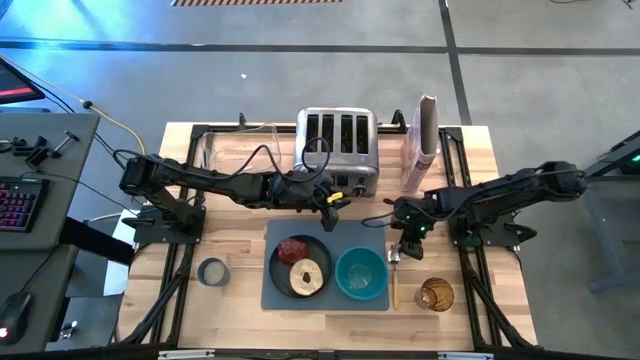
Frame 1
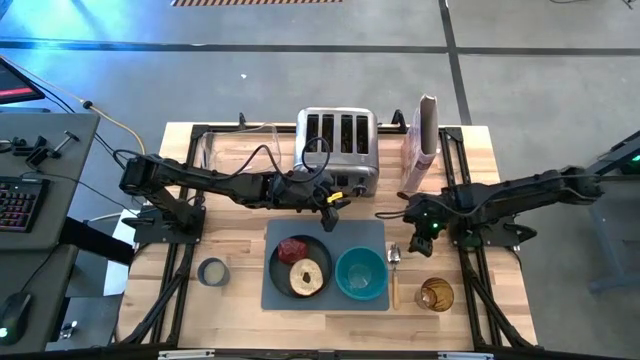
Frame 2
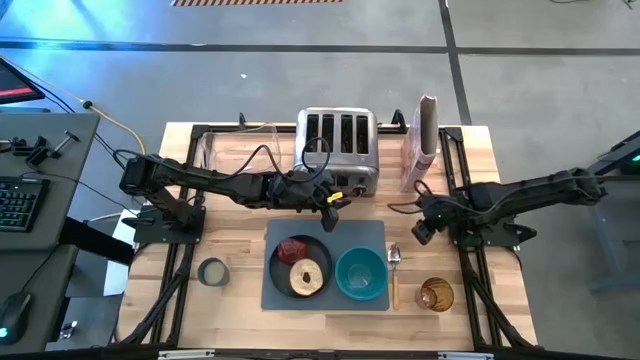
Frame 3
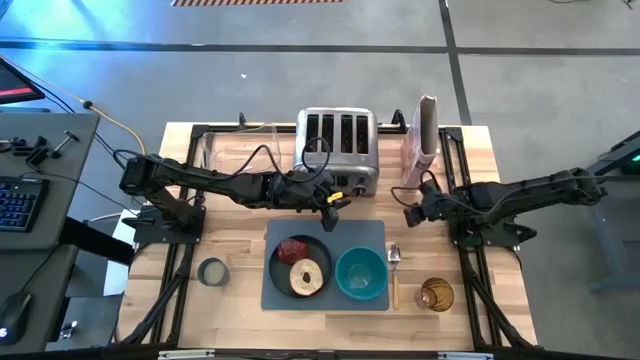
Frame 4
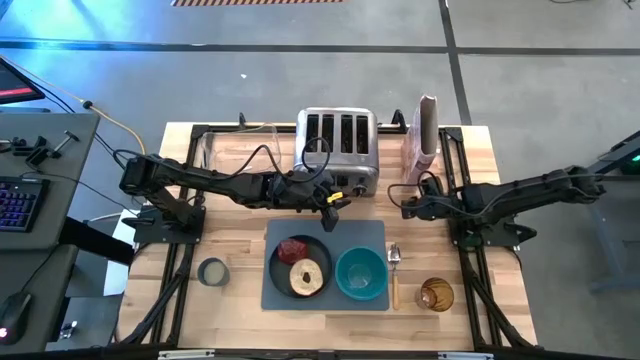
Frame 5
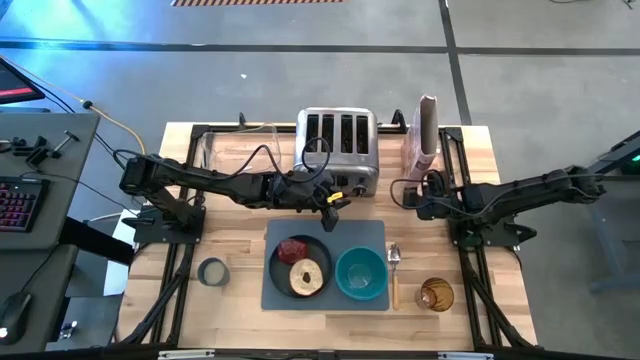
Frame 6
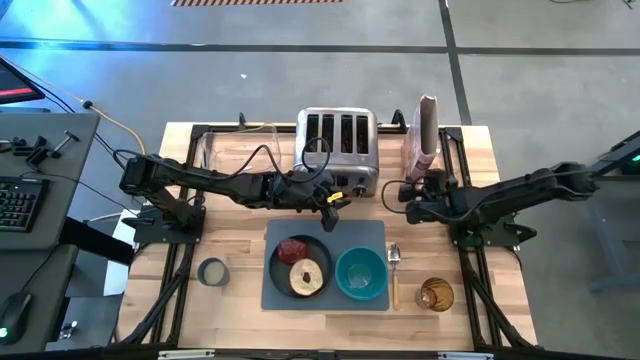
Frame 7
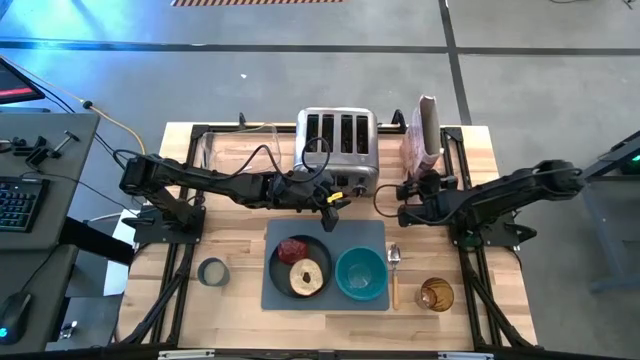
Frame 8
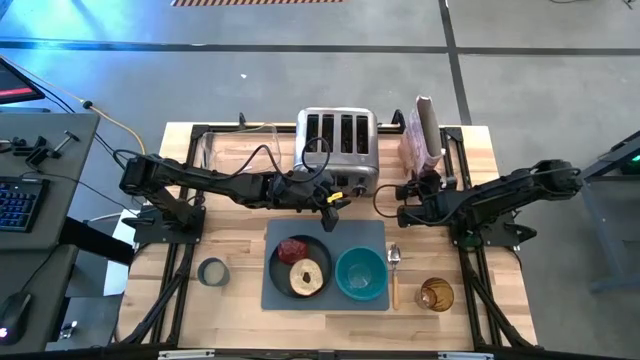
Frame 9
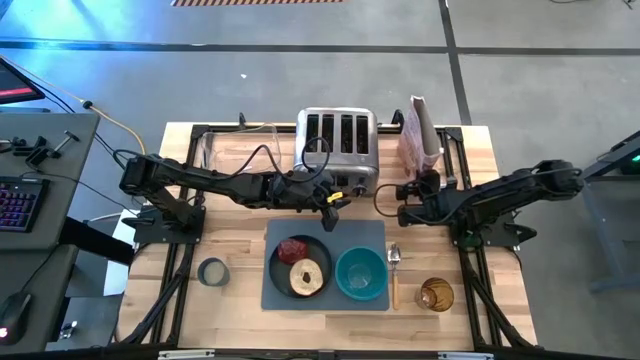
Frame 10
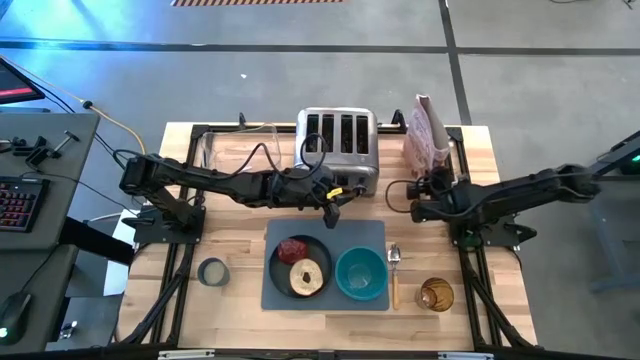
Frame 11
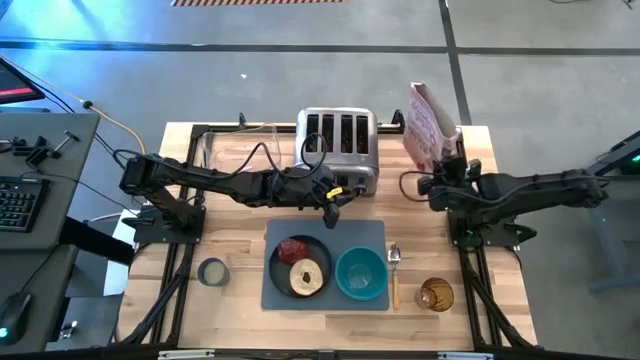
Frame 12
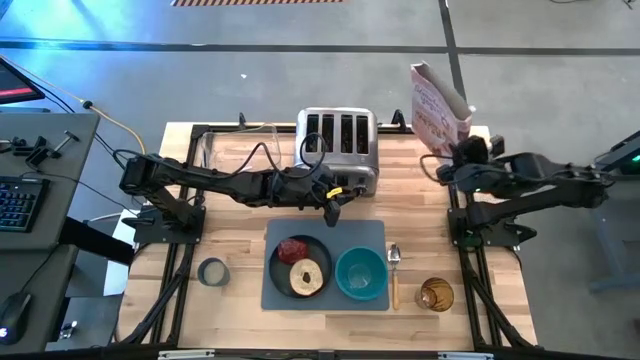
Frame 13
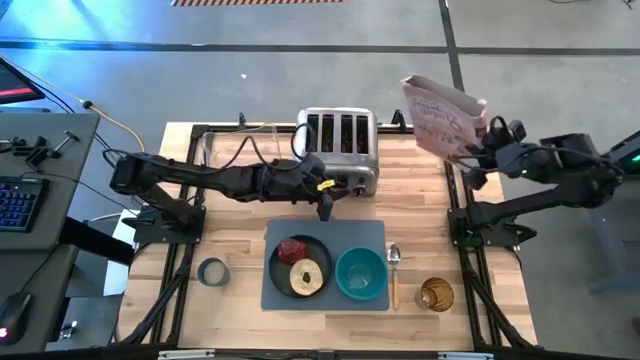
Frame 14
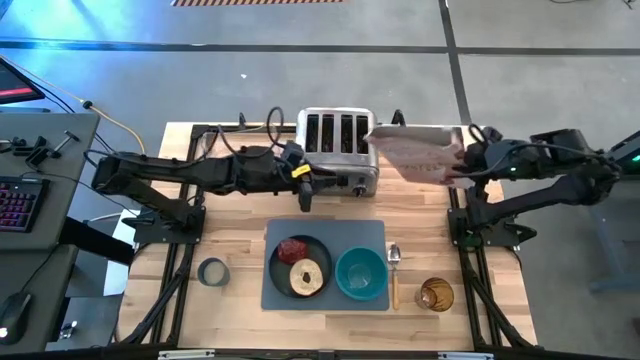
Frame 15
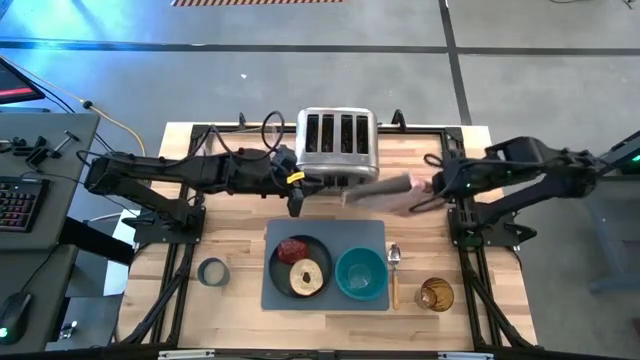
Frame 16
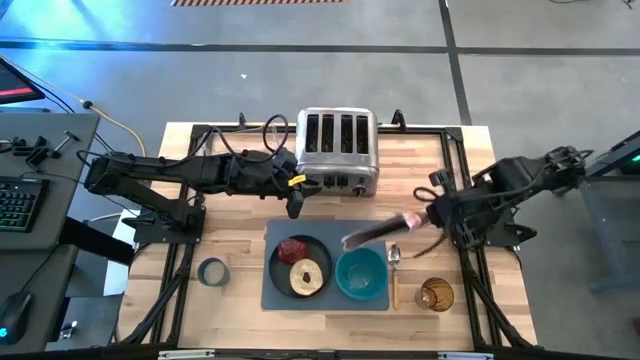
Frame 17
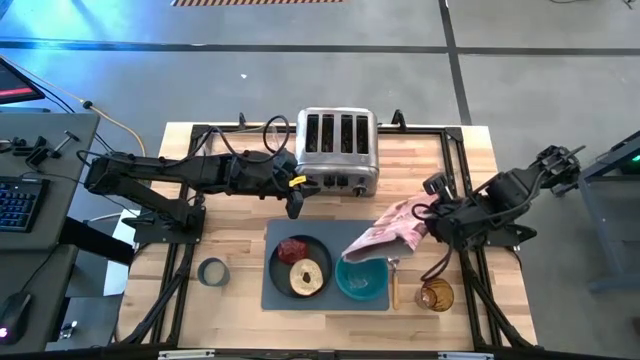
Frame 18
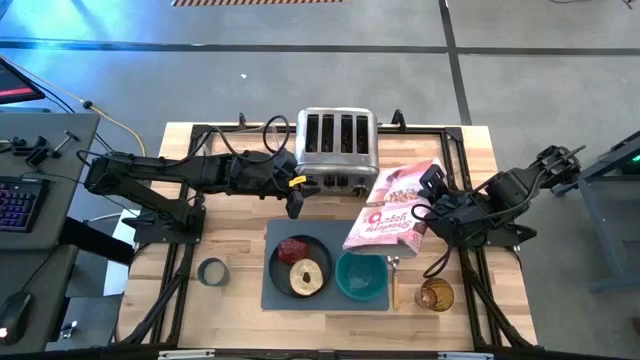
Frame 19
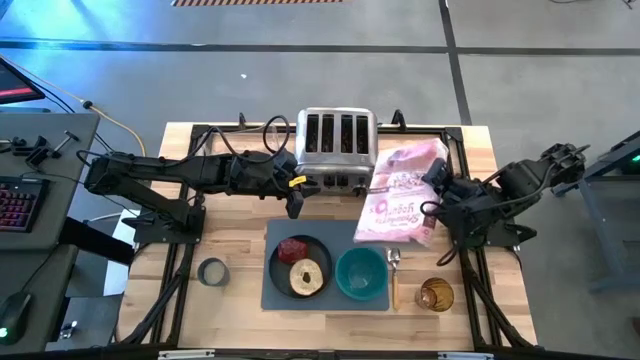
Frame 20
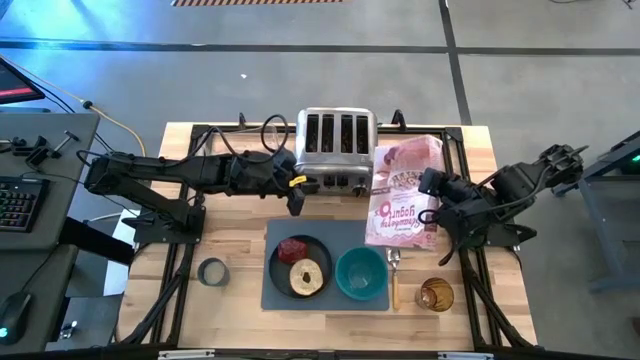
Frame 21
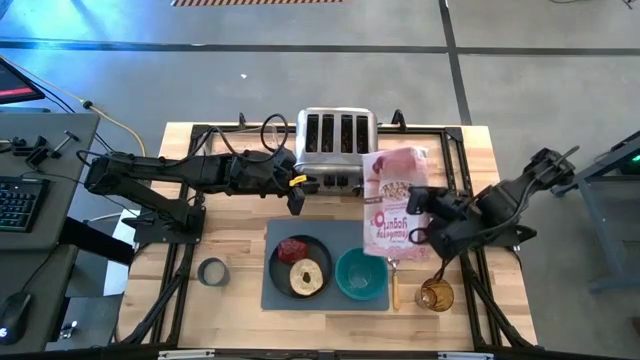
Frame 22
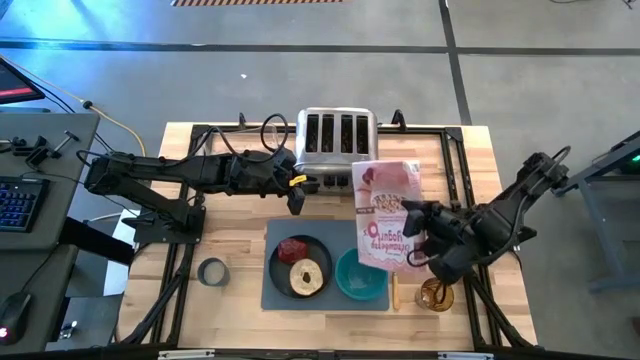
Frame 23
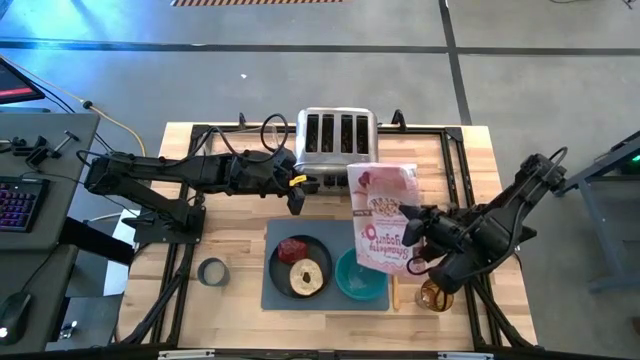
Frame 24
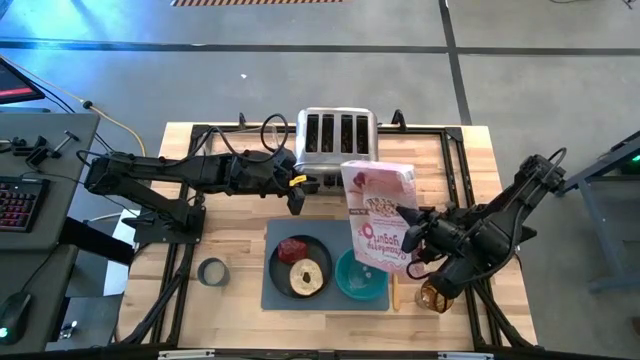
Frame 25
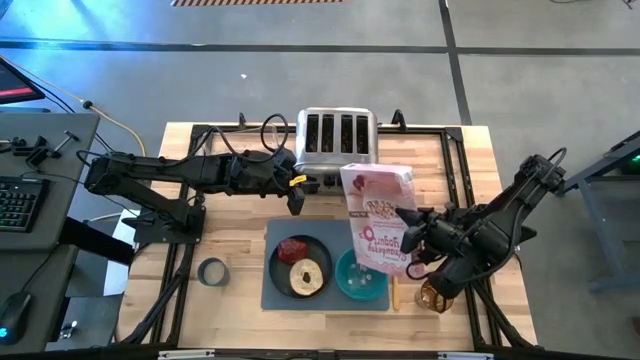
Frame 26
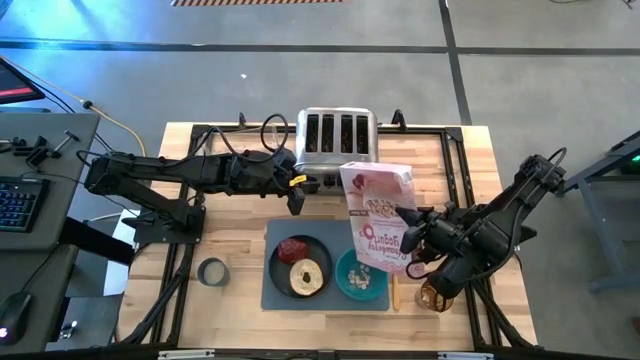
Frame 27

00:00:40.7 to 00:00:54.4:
Task: Arrange a breakfast setting
Pour the cereal from the pink cereal box into the blue bowl

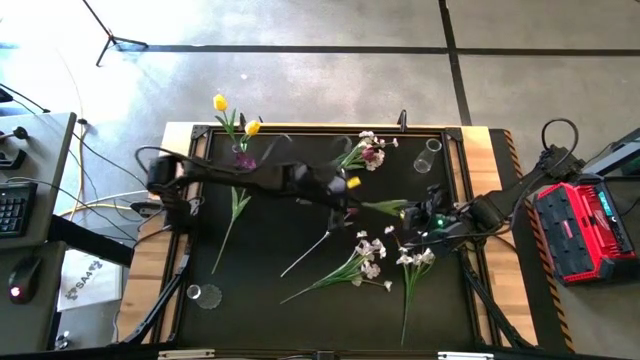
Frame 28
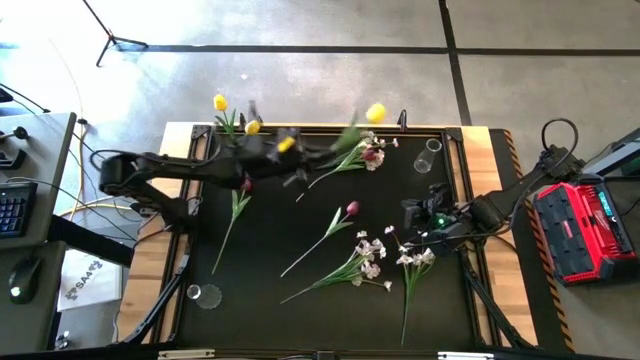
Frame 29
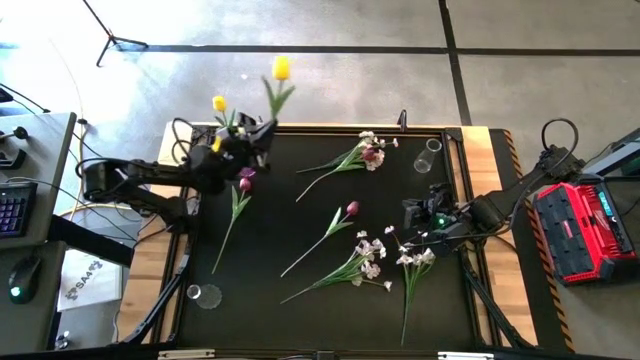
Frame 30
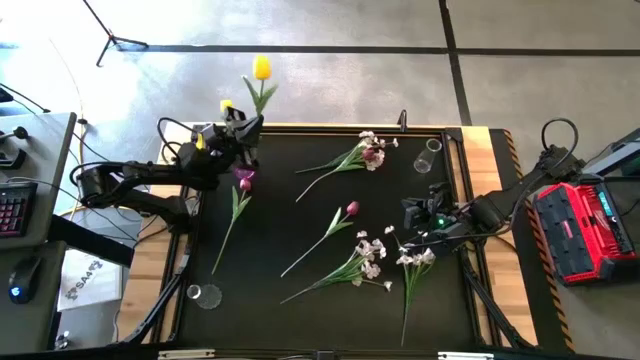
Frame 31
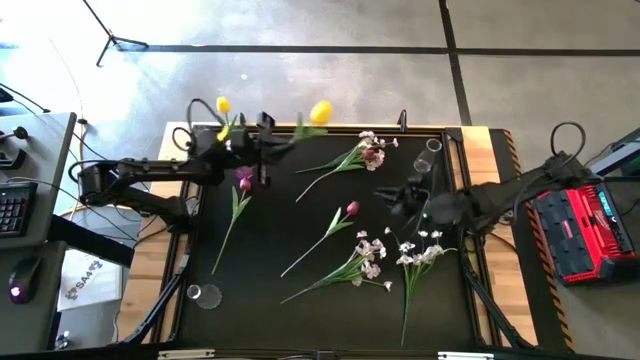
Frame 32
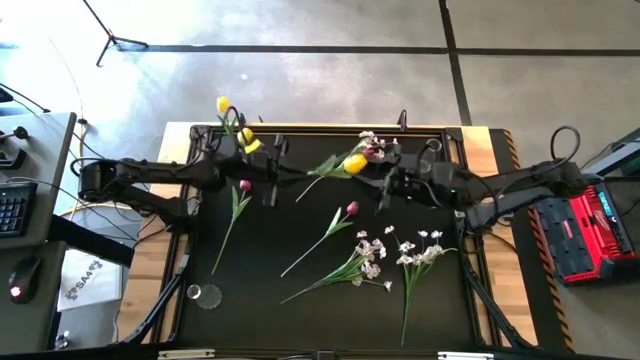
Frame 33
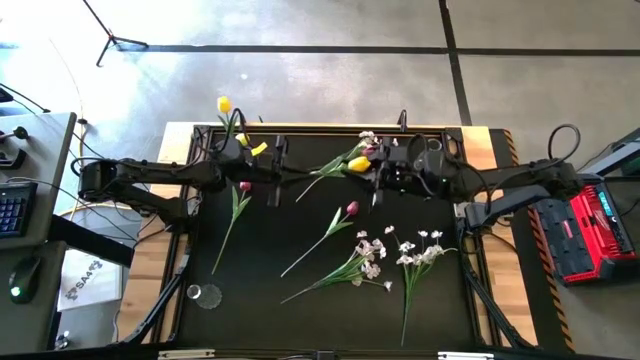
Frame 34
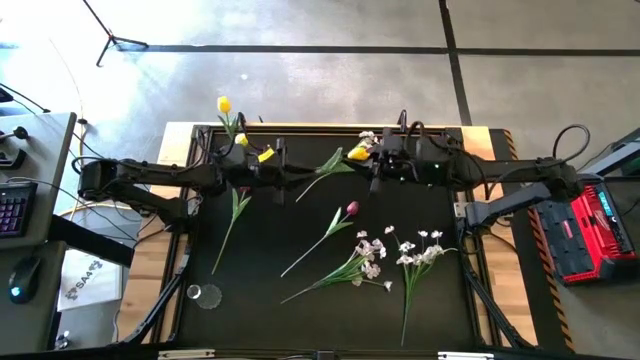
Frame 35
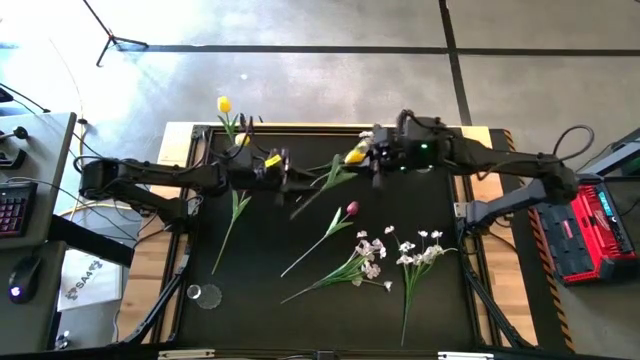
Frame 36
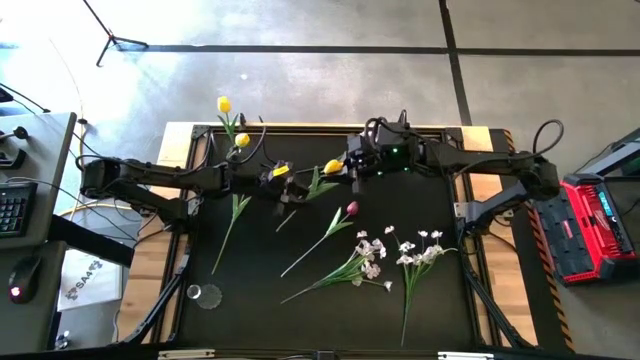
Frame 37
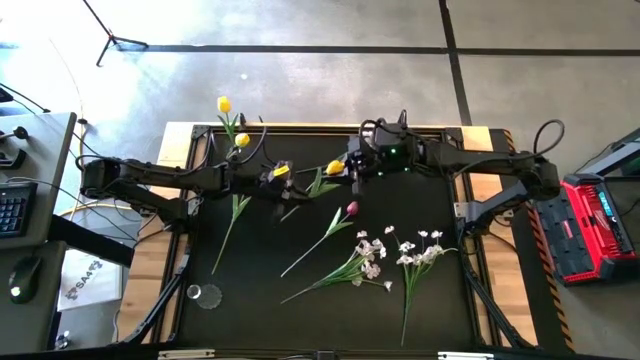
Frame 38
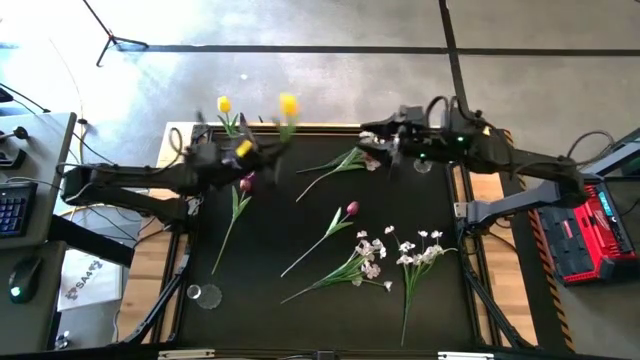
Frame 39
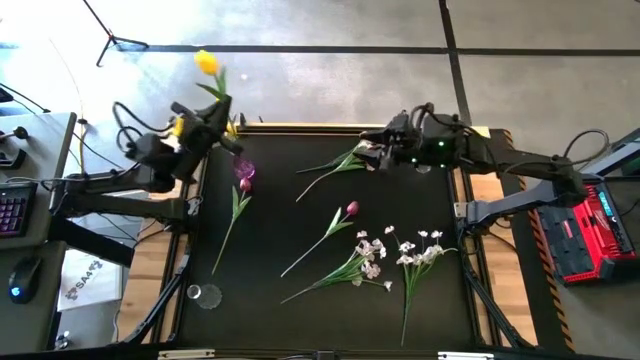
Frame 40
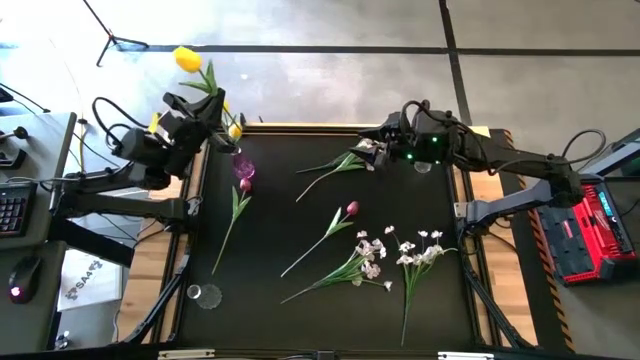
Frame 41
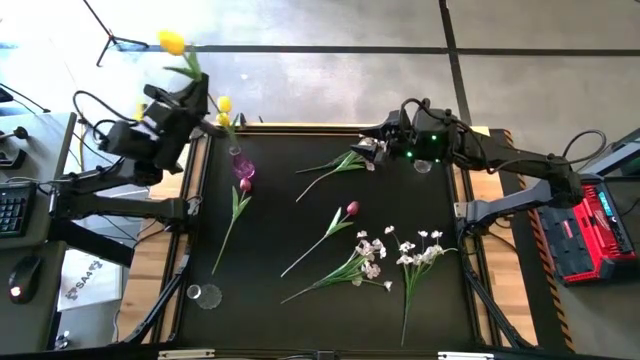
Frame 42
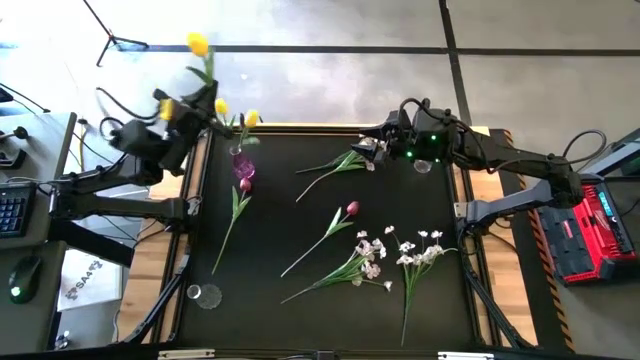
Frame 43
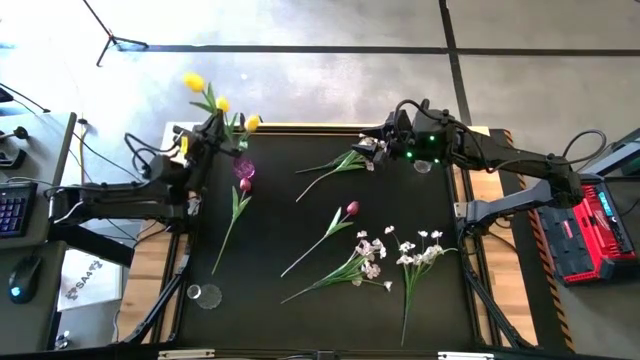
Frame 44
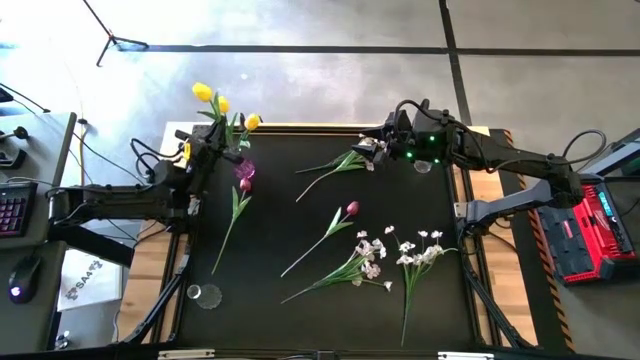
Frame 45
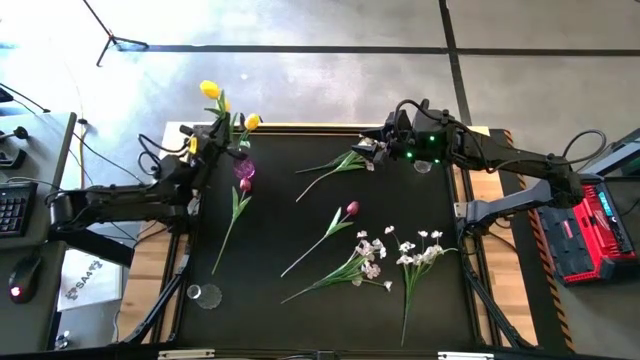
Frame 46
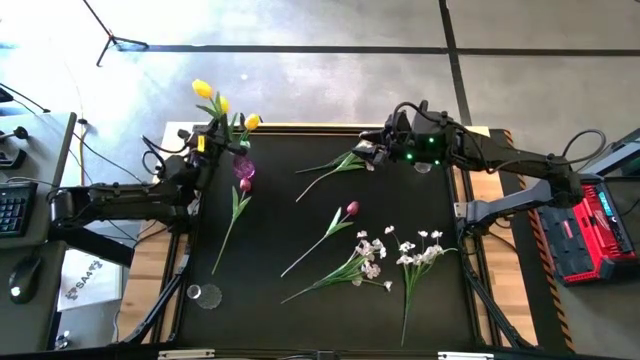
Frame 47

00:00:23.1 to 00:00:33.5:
Task: Sort flowers into vase by color
Put the yellow tulip into the violet vase
